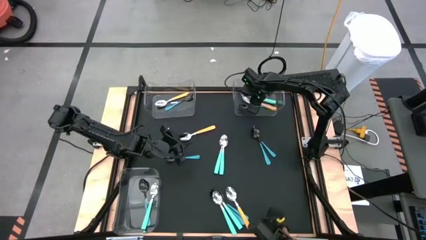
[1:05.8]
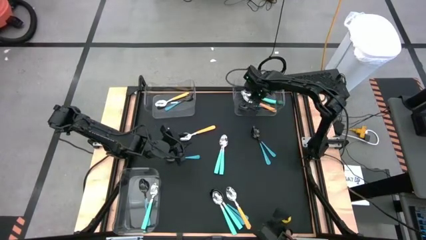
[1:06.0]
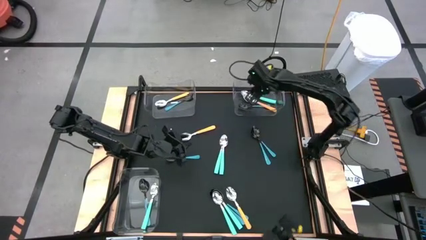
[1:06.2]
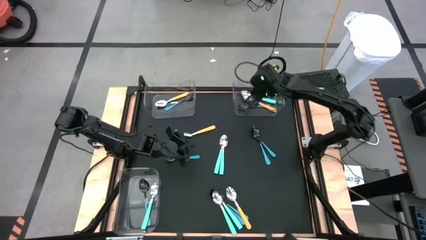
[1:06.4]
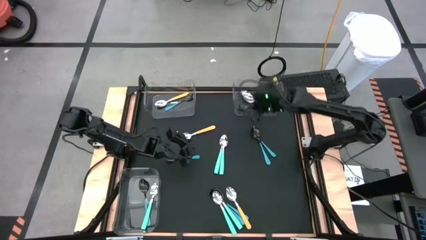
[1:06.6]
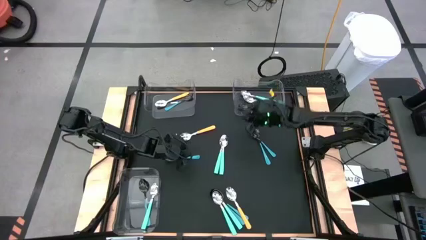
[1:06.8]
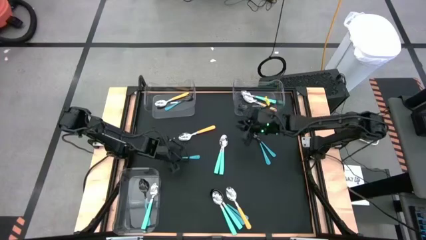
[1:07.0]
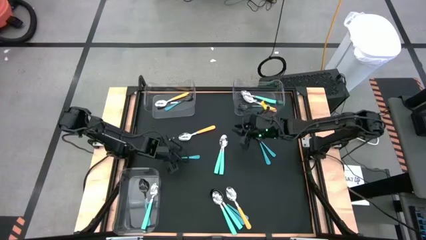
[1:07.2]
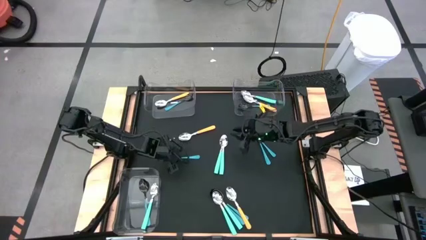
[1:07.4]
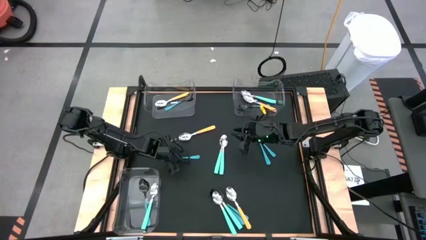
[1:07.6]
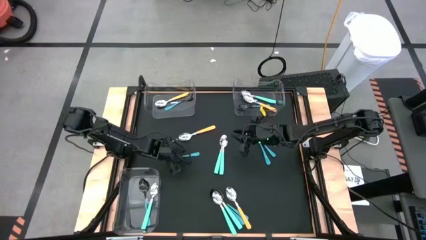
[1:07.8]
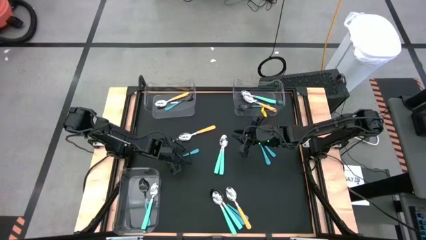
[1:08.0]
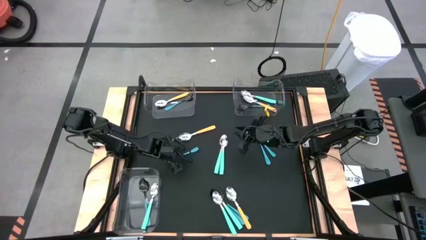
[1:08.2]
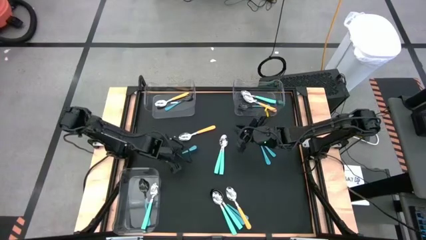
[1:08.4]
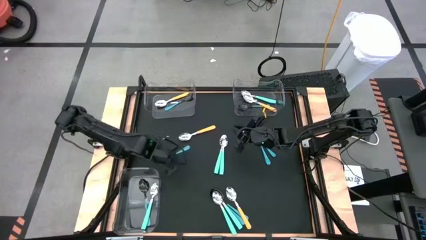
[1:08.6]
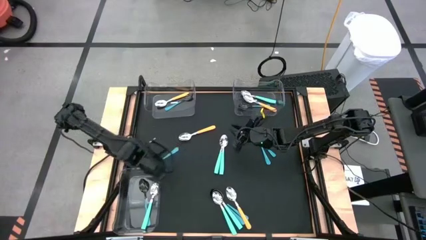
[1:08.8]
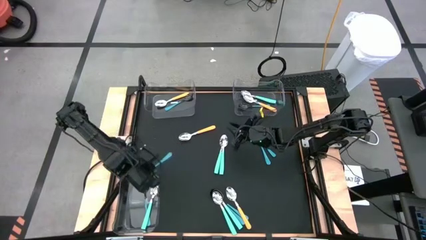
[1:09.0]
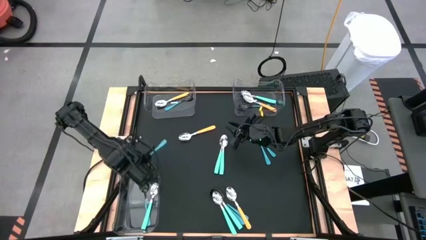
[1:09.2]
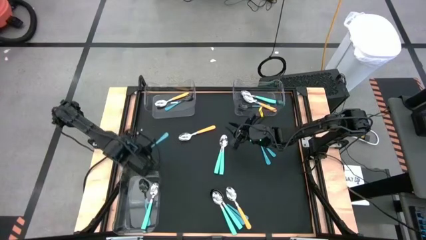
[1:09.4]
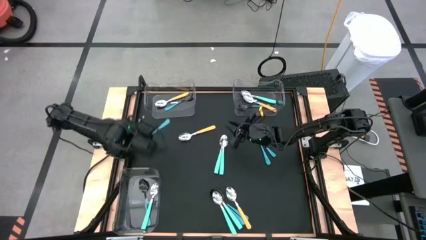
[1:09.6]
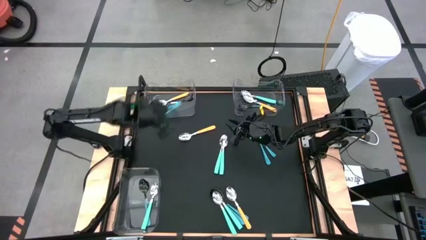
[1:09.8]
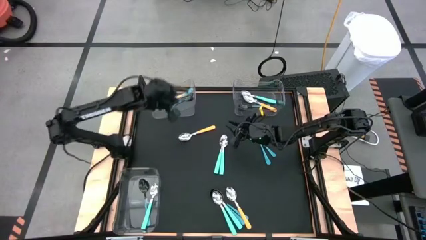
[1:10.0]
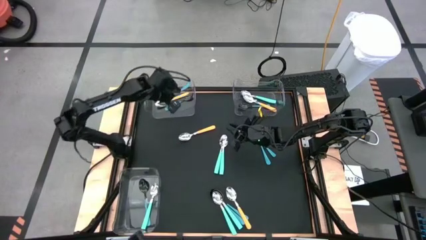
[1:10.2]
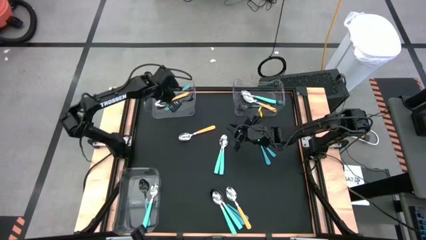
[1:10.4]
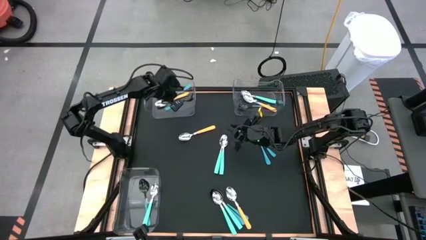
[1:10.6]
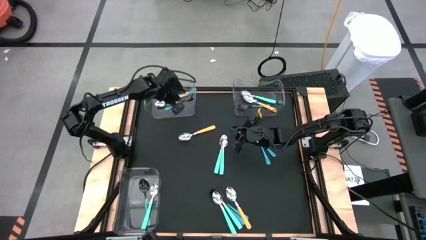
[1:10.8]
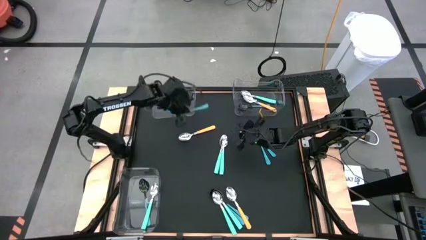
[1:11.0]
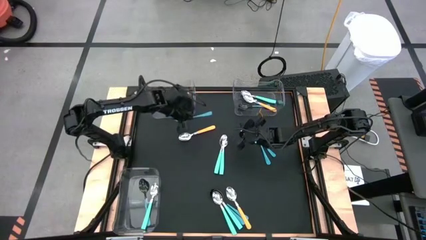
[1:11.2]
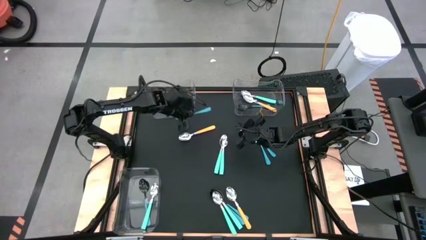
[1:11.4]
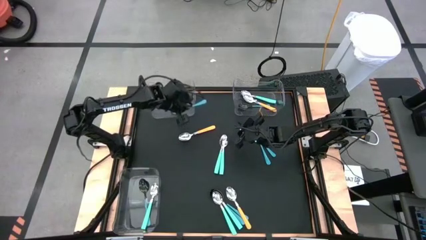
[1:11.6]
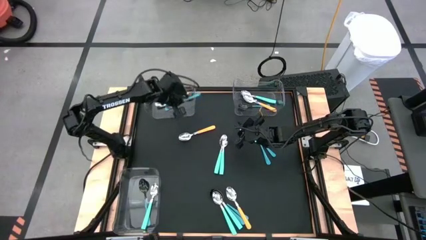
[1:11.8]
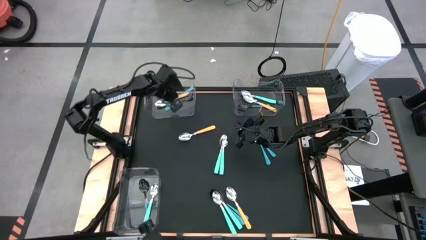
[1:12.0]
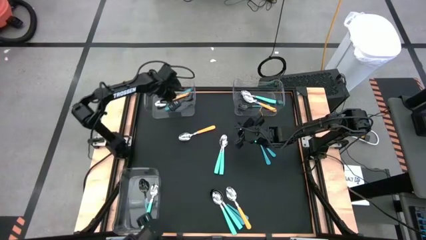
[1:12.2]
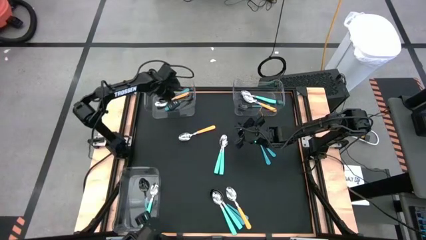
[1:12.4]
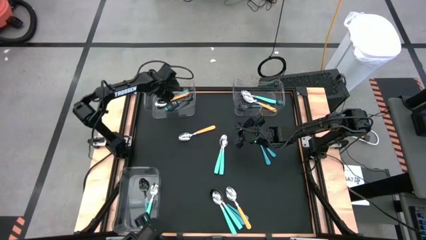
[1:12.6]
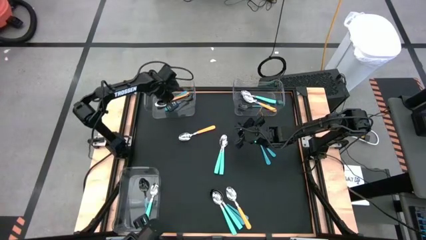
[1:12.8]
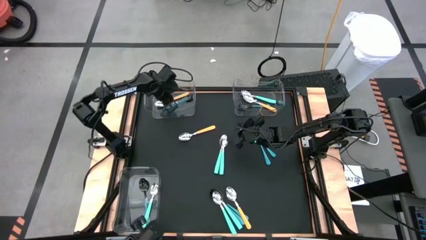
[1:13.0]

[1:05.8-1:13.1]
Task: Sort silverware by color (type)
Put the blue spoon into the top left transparent bin

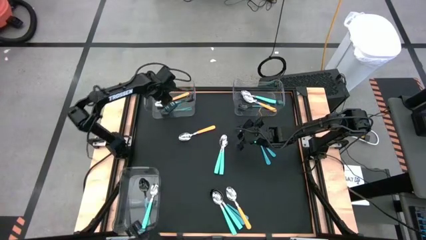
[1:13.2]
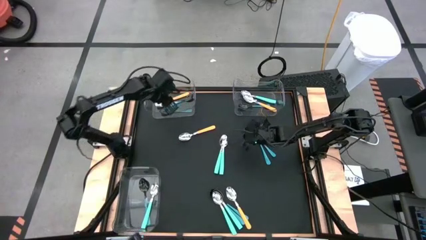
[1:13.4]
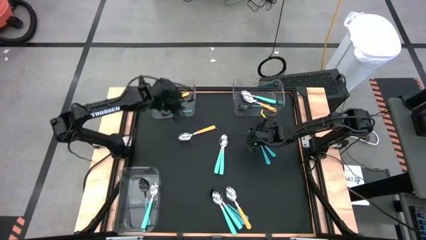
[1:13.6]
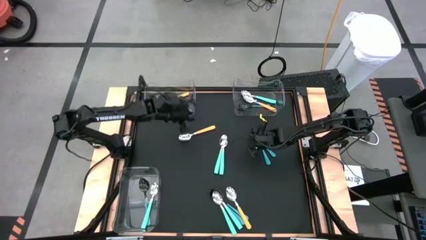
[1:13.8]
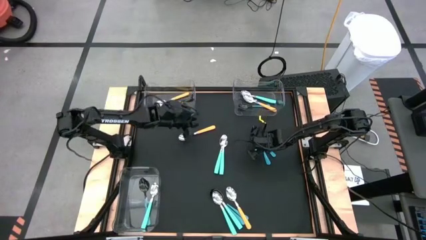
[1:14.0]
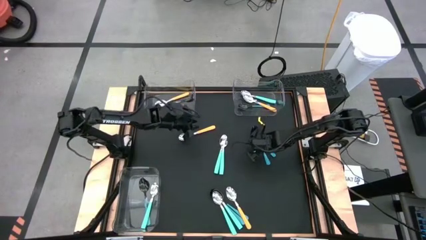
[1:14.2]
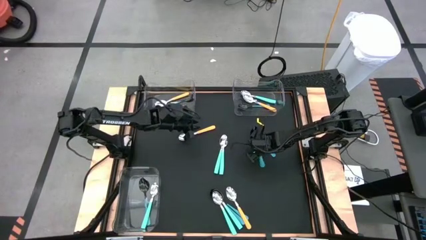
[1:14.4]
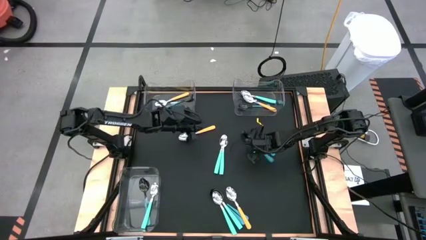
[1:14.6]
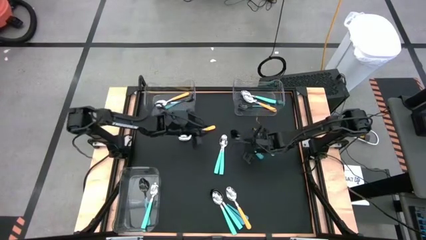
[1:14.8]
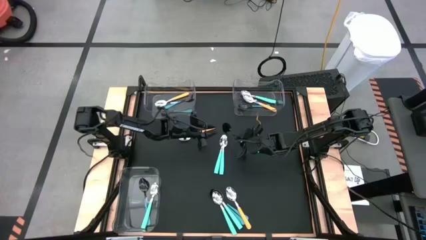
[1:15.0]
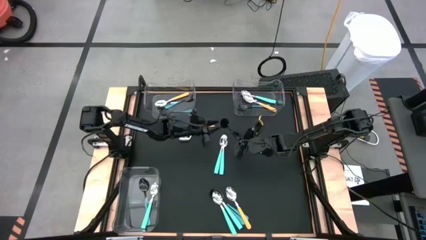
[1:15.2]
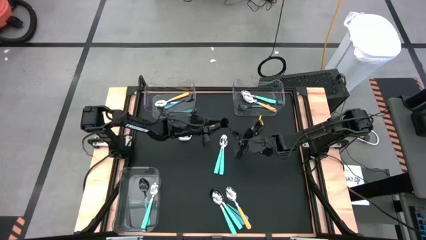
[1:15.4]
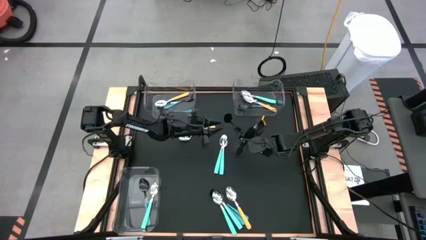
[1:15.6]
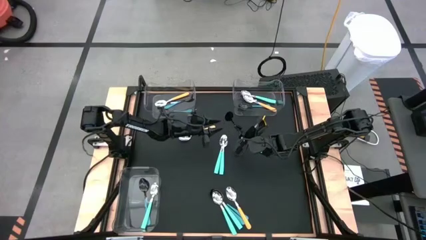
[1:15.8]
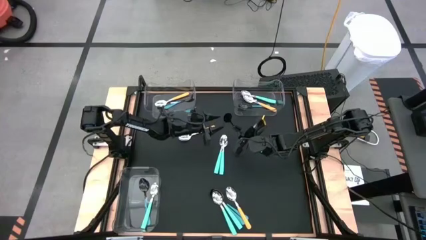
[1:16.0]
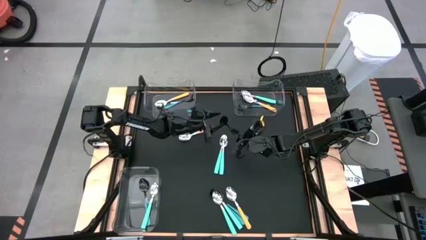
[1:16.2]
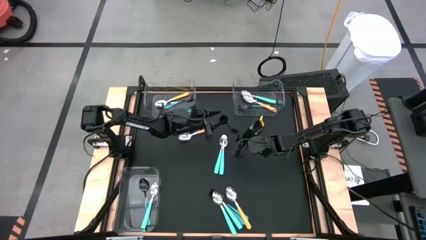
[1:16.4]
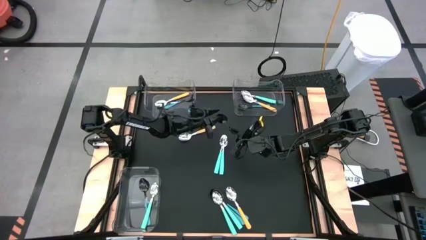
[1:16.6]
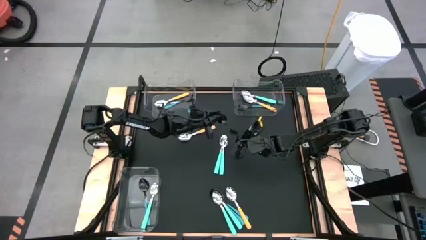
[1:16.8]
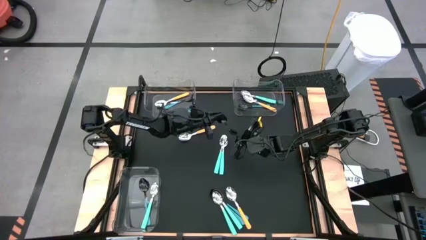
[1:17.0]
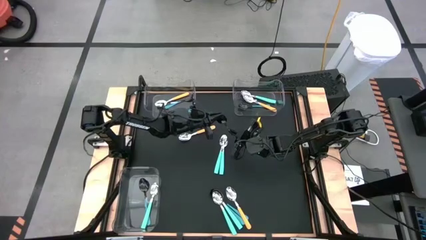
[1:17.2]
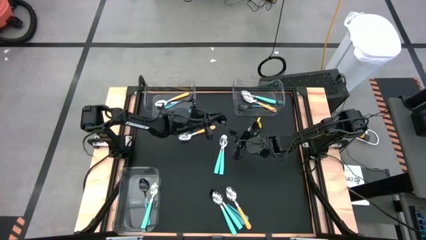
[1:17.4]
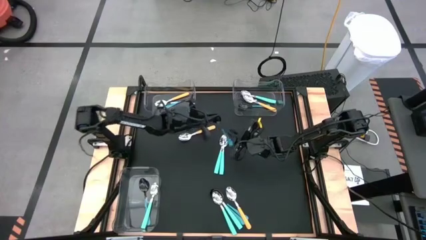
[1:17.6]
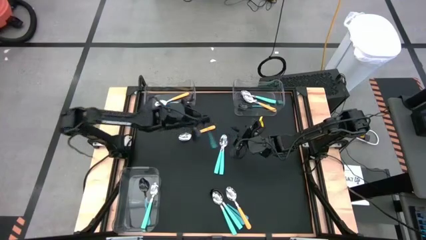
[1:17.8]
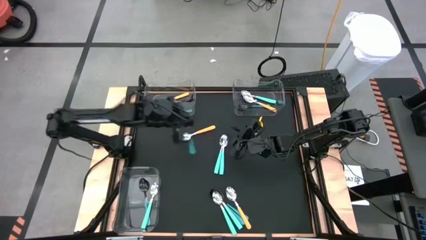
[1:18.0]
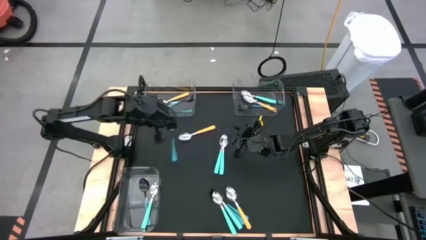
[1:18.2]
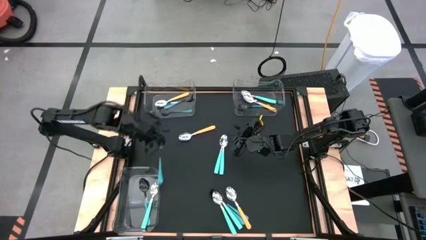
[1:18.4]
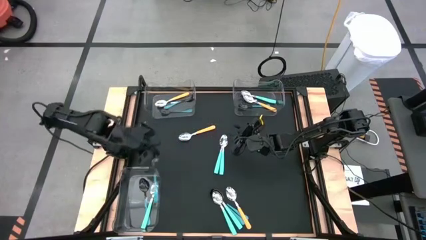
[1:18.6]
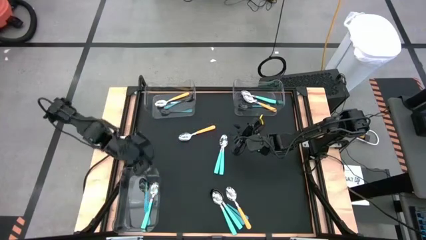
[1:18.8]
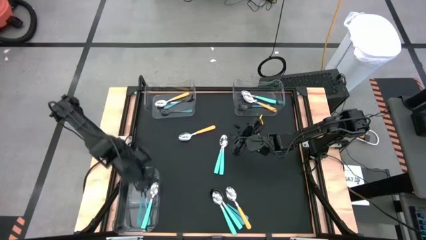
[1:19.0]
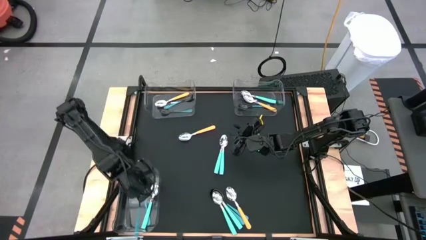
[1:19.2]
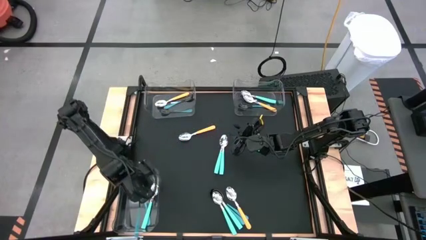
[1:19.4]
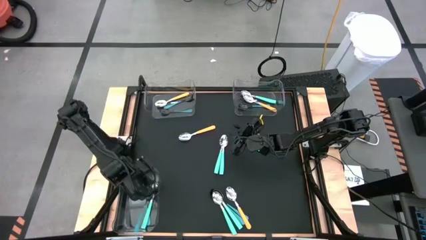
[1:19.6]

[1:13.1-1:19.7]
Put the blue spoon into the bottom left transparent bin

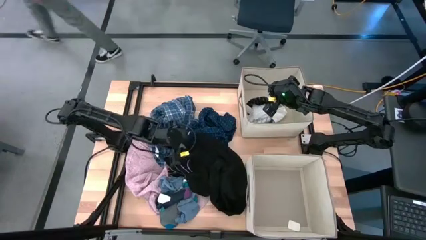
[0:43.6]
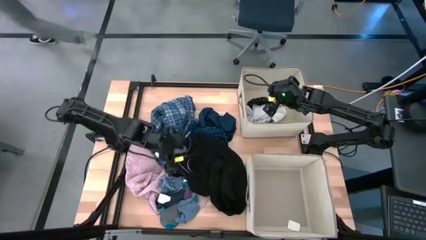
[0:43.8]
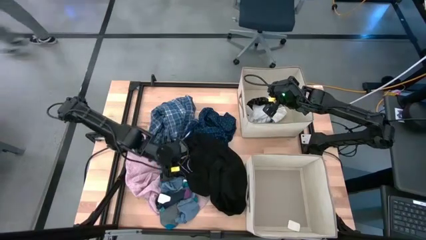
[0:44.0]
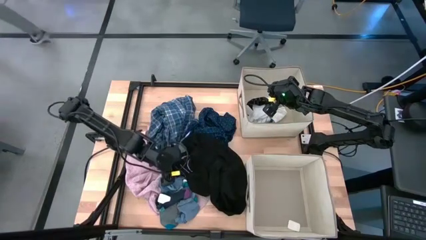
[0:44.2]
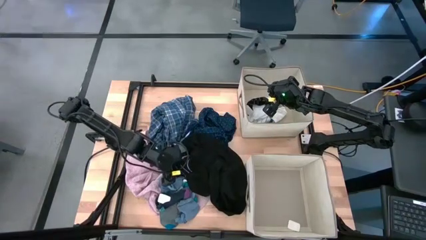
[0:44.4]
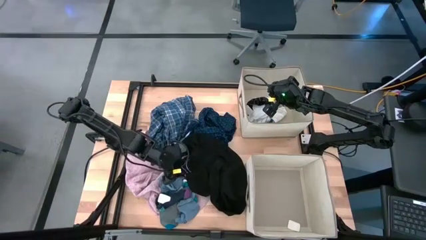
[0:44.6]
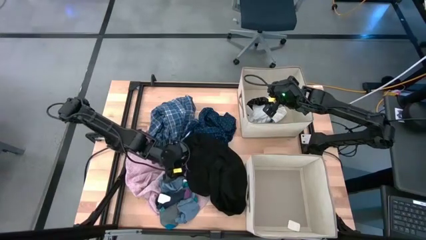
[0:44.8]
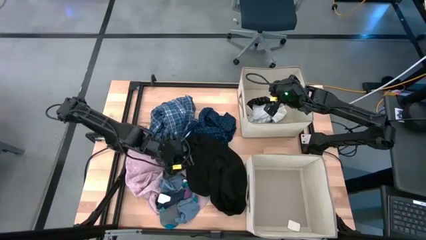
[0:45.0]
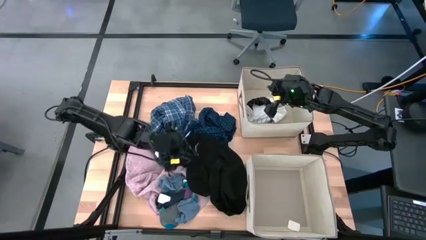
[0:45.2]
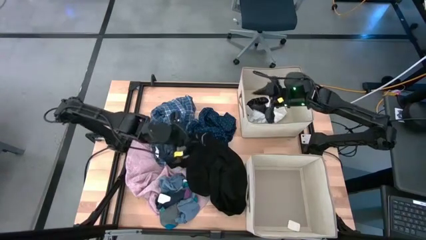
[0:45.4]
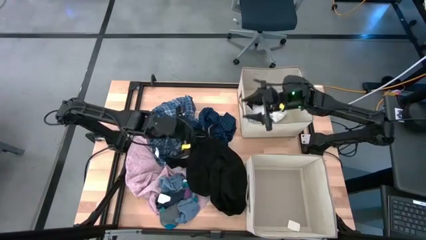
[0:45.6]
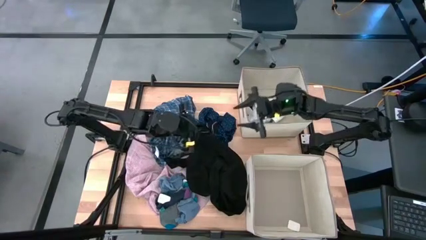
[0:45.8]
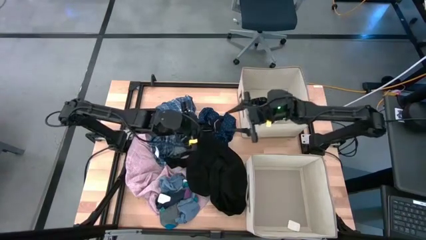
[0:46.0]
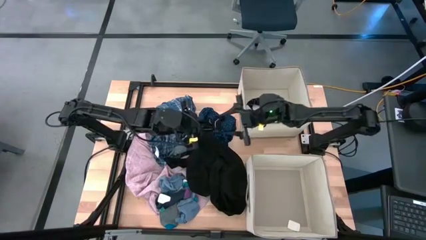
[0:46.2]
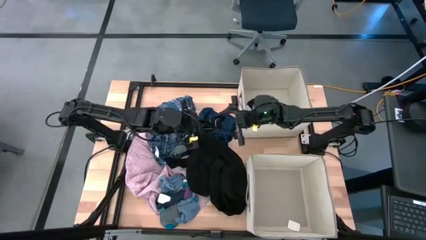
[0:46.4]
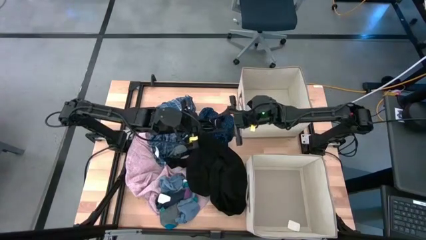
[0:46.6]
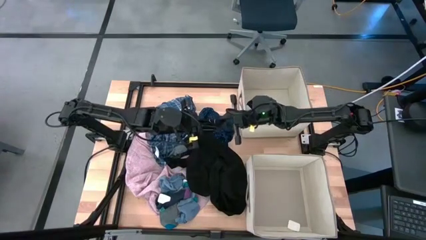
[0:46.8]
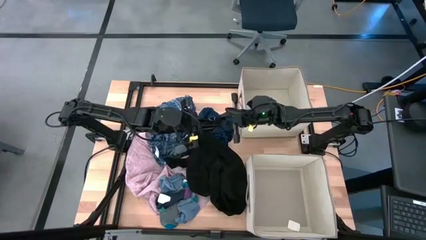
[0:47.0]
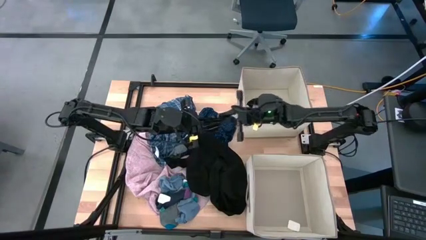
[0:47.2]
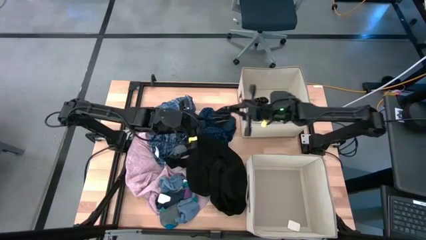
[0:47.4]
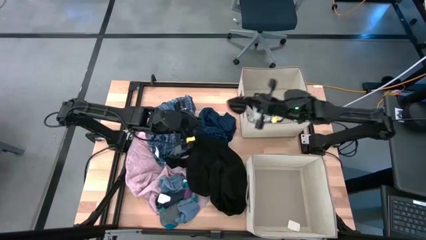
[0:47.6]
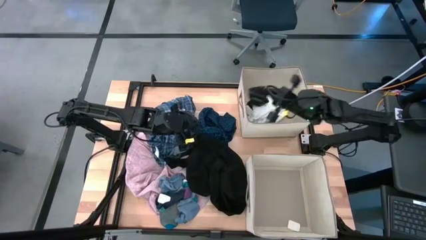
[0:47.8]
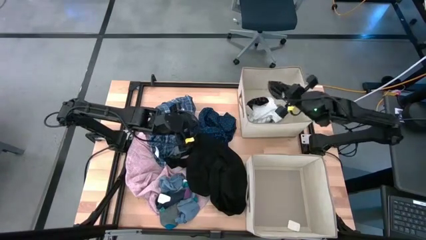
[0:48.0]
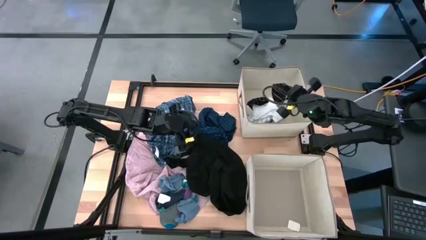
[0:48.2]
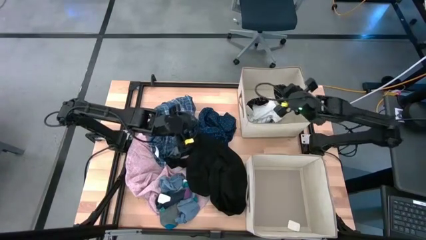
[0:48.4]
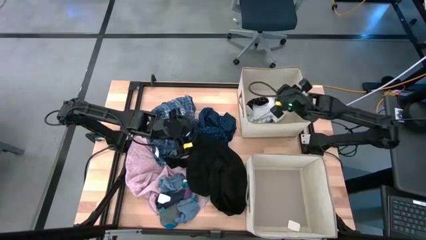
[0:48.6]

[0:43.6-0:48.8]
Task: Sort clothes
Put the striped black sock into the top laundry organizer
